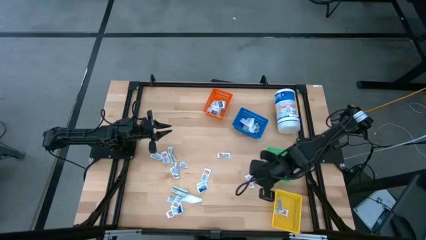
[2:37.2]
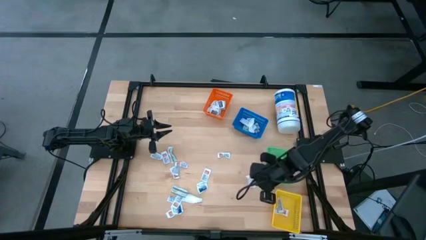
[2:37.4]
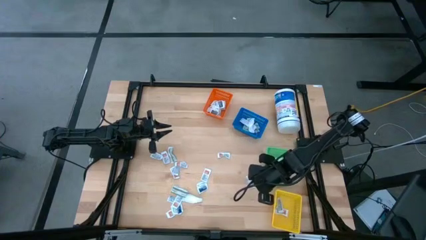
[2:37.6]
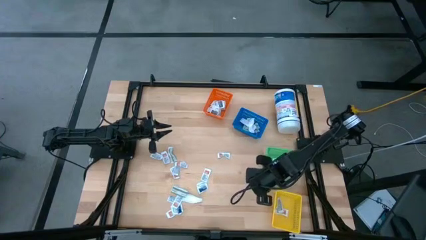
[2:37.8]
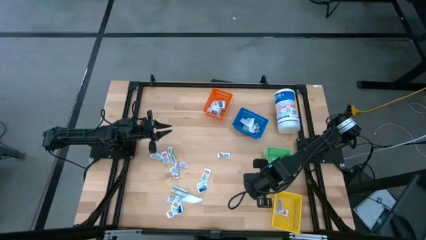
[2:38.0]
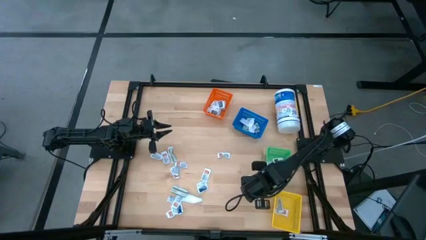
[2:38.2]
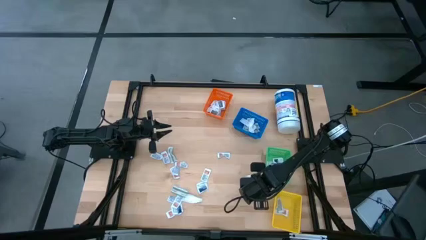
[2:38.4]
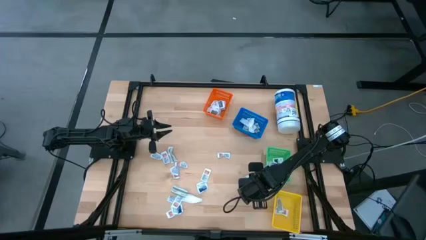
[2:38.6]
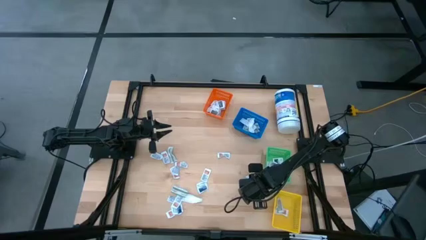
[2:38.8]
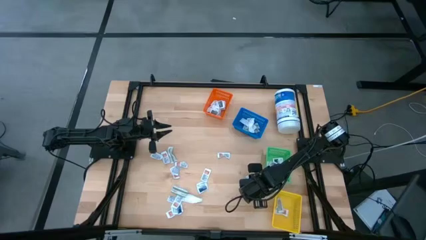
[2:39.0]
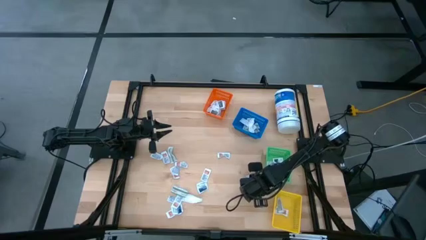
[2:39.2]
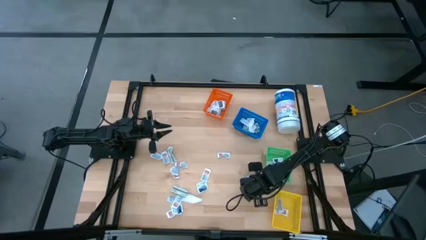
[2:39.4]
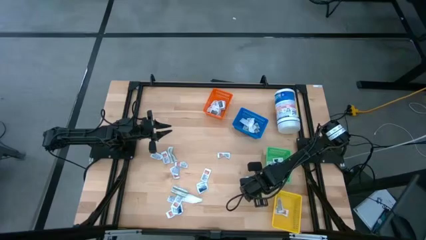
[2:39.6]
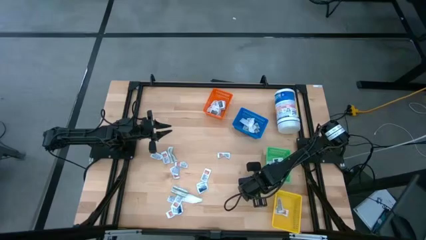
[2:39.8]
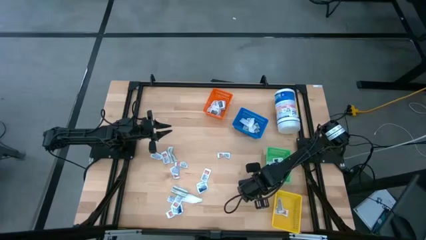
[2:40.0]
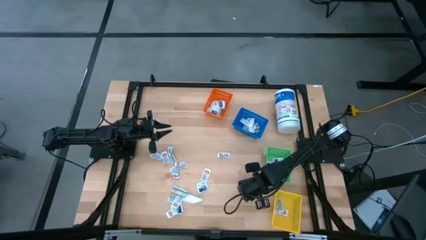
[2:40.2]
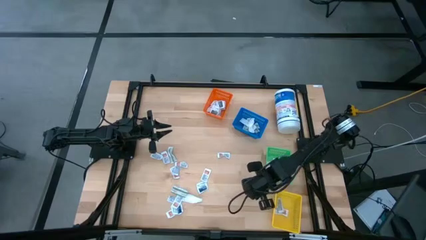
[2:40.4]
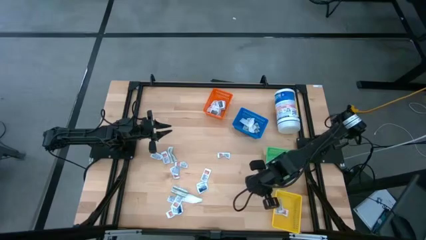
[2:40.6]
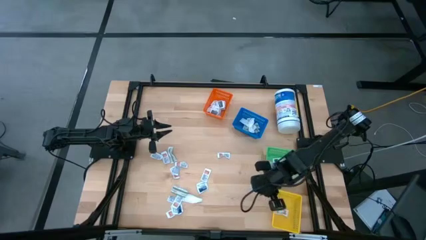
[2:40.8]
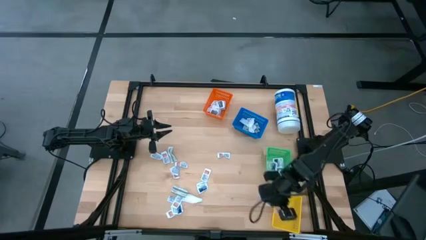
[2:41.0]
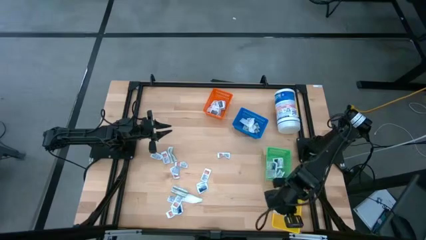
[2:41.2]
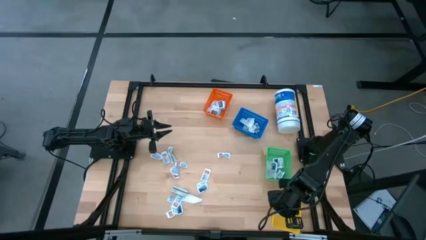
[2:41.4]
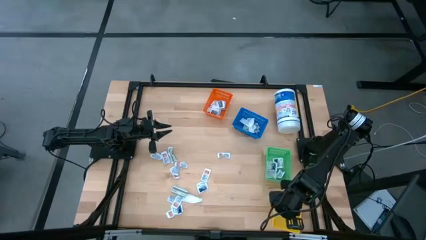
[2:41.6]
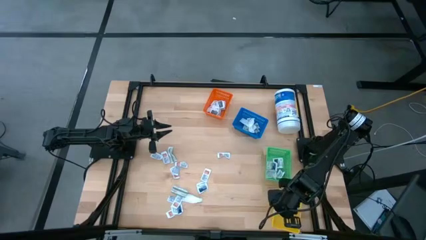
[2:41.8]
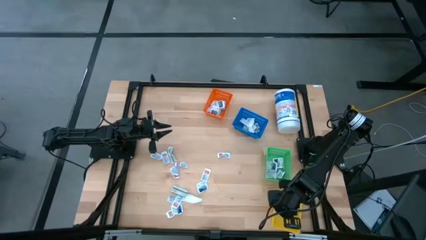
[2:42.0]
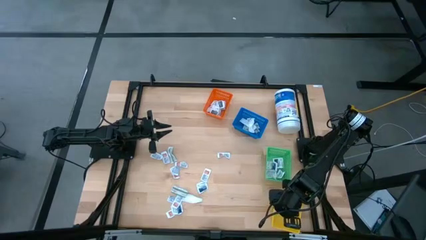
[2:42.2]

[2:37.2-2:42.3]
Task: Pick & Place First Aid Supplies
Put the orange ointment pack into the yellow basket

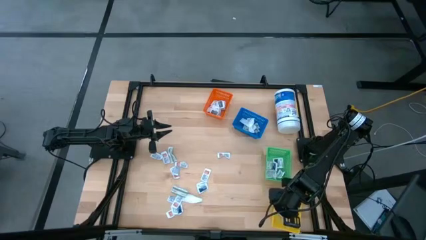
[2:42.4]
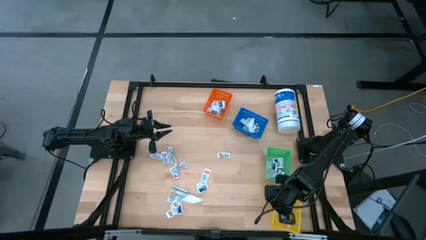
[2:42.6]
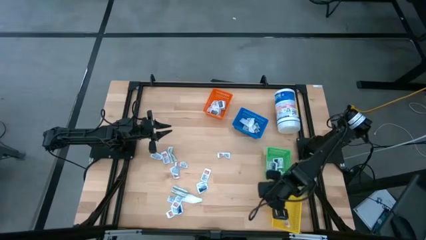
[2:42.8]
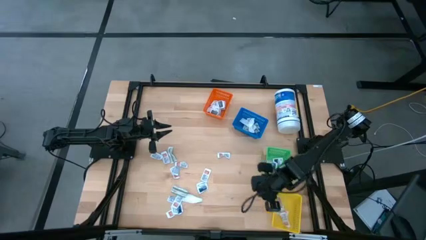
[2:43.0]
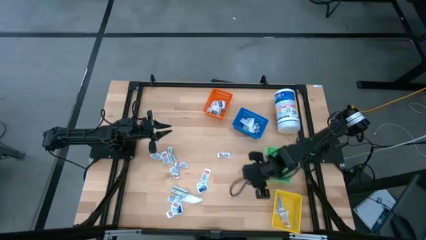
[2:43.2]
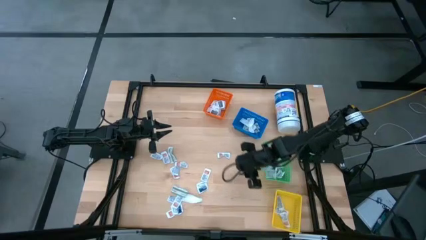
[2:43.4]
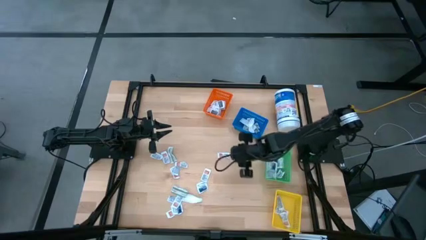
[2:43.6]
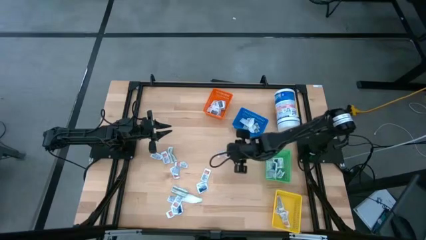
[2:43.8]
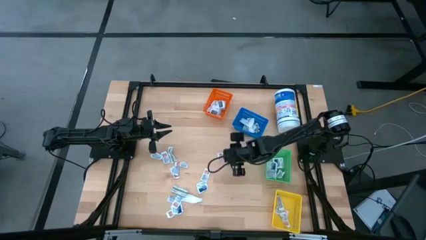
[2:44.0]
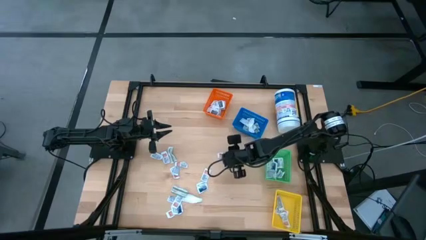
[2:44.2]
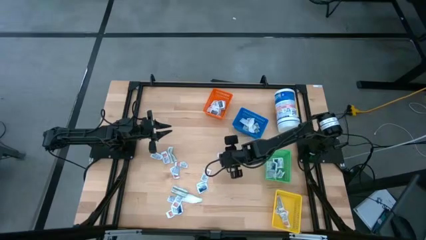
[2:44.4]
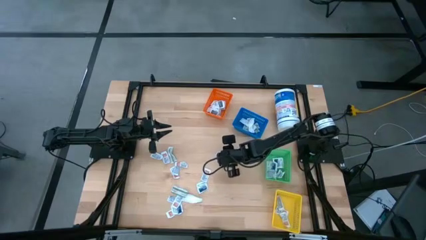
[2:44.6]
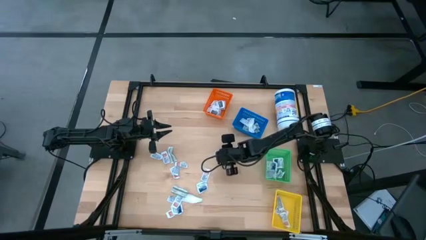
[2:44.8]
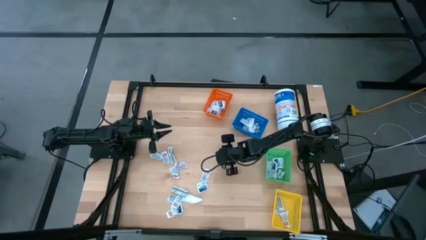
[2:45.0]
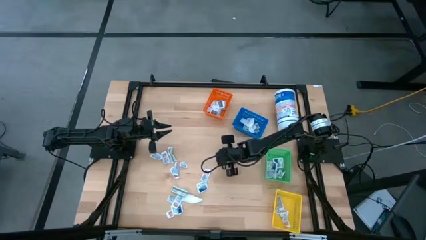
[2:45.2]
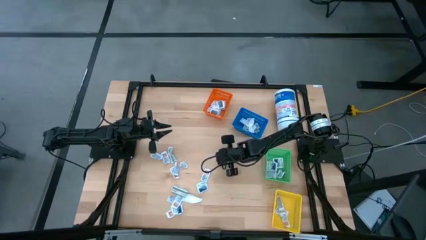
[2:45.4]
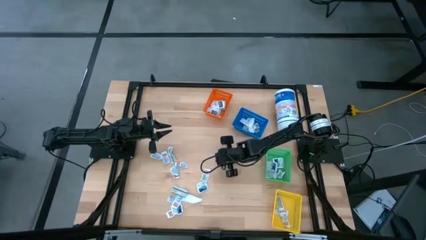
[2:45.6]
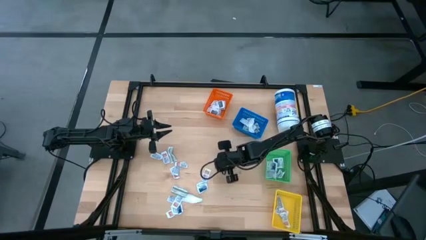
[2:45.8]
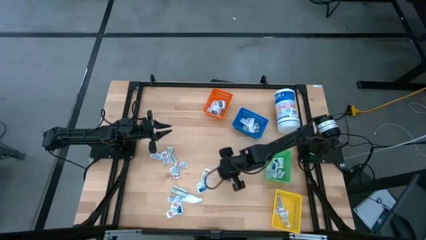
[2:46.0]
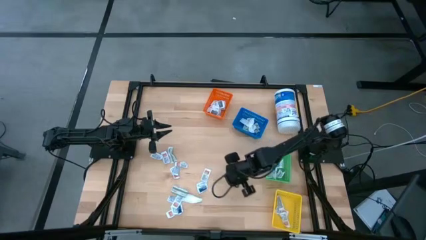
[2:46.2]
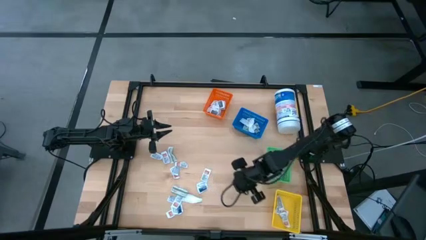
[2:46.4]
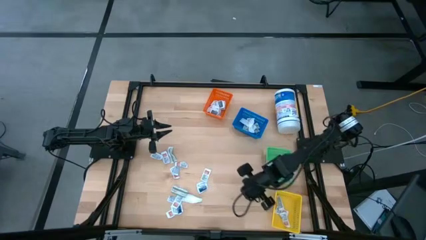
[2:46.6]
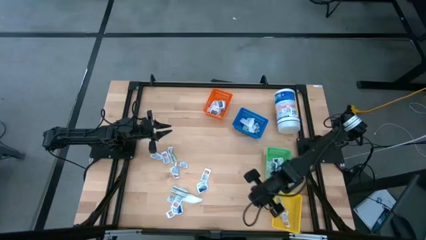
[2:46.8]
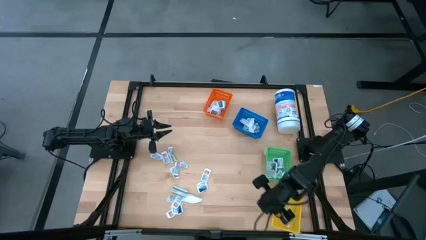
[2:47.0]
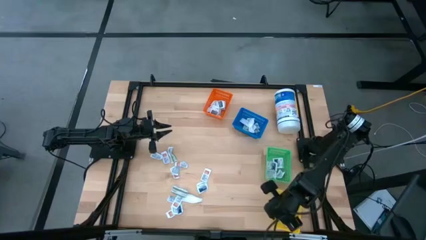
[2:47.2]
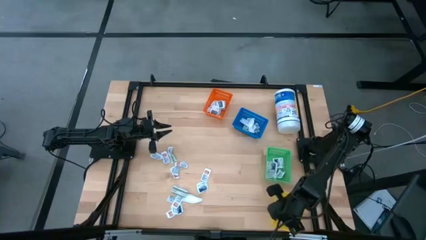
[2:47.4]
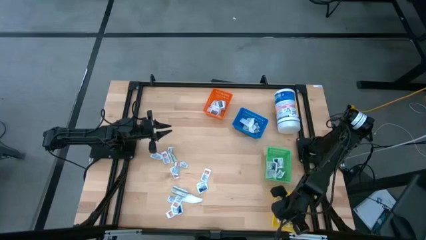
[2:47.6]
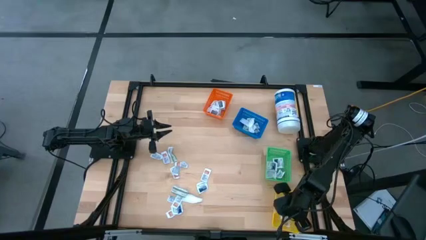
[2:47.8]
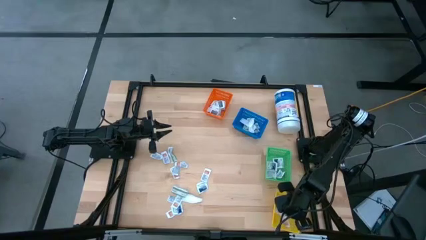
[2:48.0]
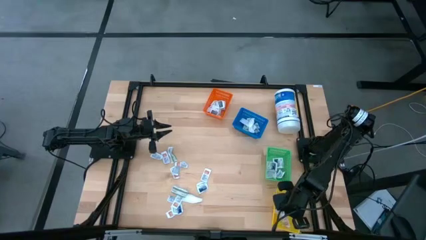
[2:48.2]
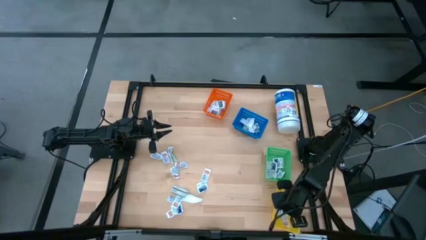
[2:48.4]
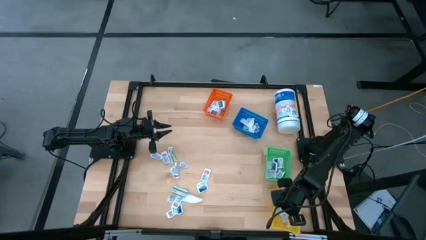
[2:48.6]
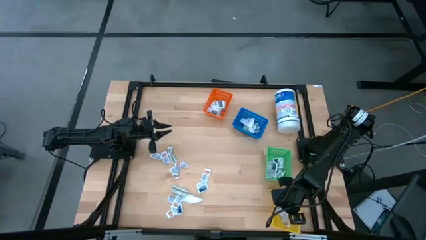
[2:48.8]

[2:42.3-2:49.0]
Put the orange ointment pack into the yellow basket

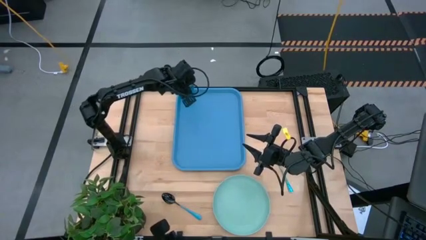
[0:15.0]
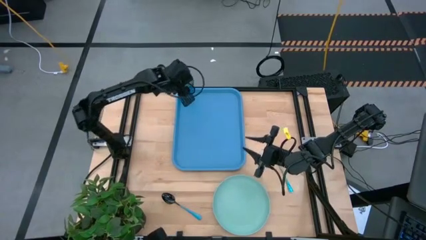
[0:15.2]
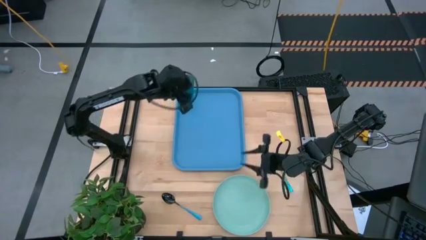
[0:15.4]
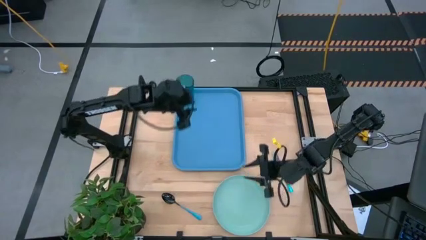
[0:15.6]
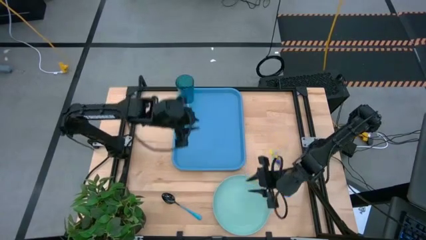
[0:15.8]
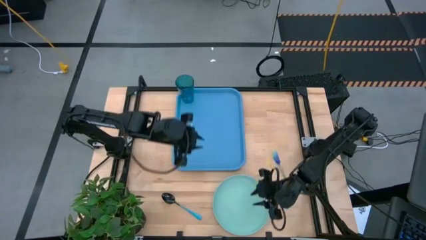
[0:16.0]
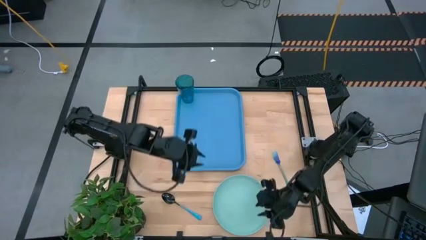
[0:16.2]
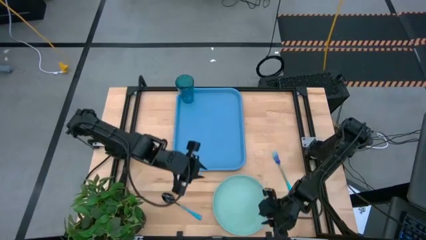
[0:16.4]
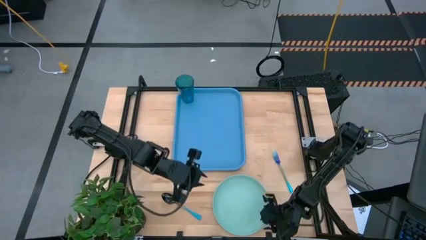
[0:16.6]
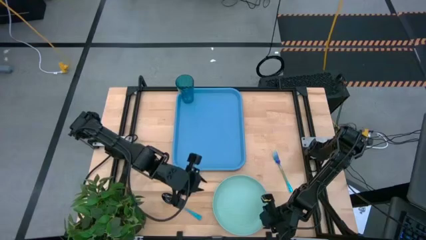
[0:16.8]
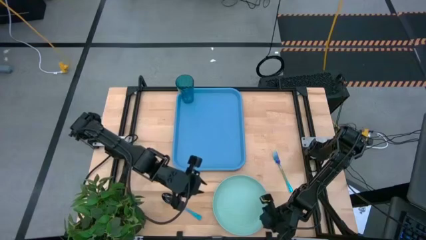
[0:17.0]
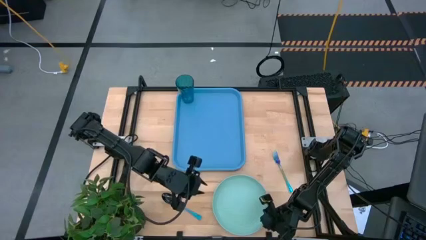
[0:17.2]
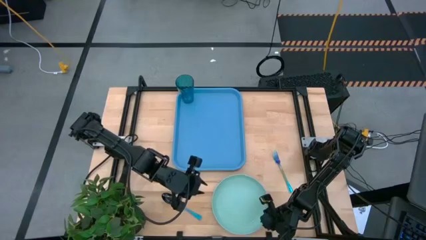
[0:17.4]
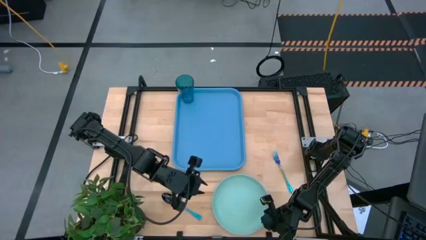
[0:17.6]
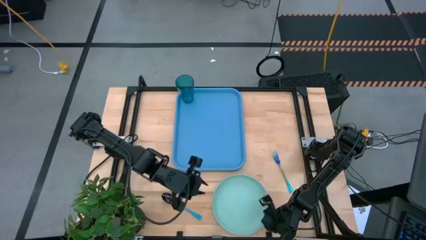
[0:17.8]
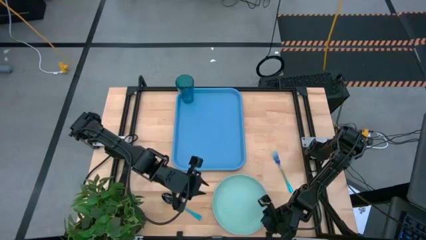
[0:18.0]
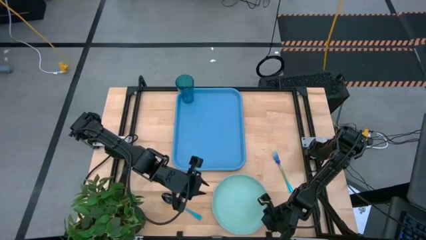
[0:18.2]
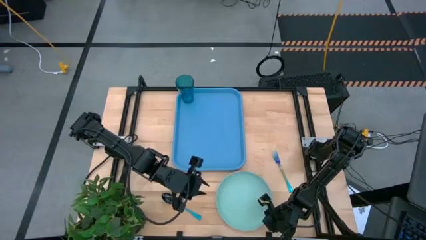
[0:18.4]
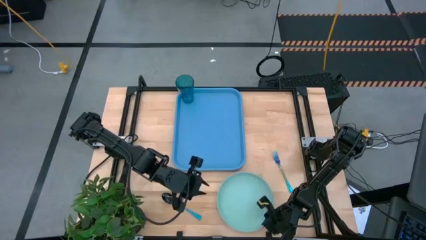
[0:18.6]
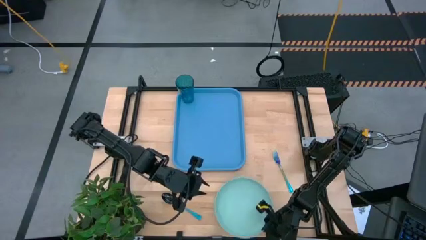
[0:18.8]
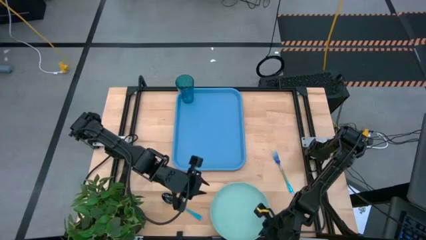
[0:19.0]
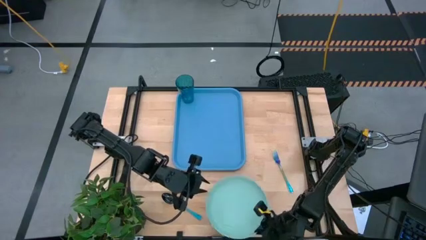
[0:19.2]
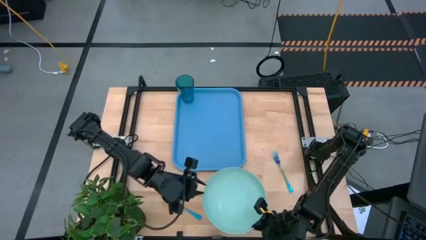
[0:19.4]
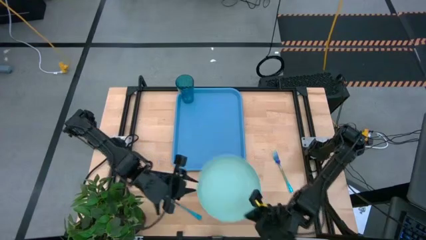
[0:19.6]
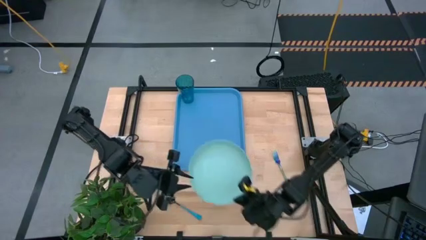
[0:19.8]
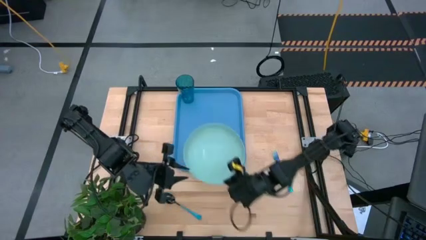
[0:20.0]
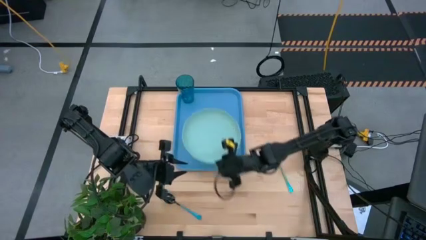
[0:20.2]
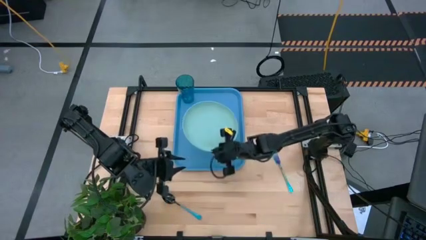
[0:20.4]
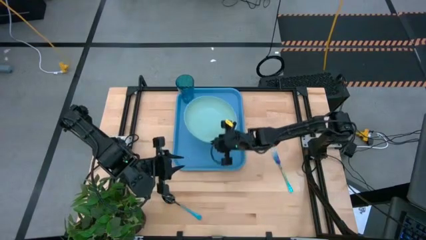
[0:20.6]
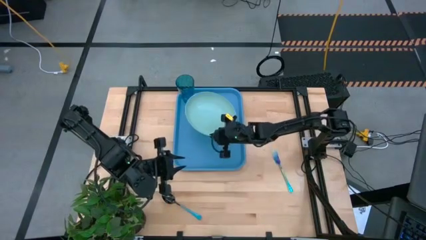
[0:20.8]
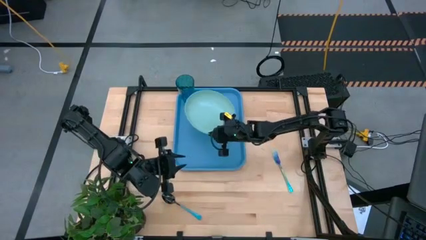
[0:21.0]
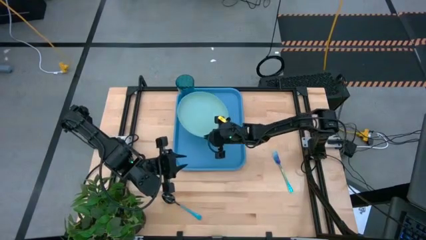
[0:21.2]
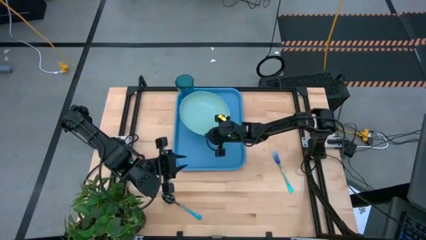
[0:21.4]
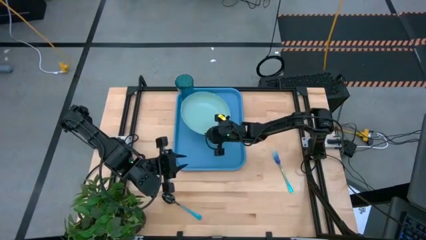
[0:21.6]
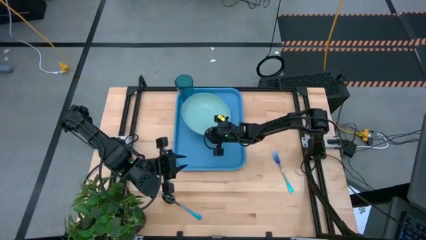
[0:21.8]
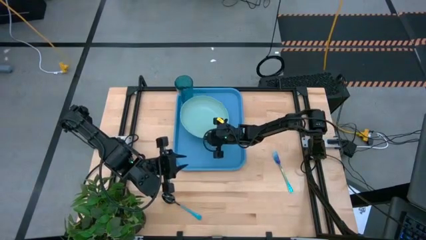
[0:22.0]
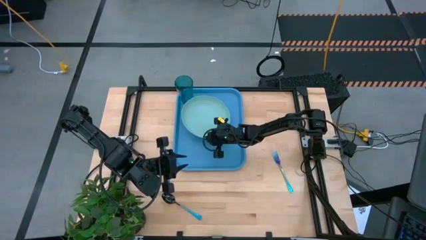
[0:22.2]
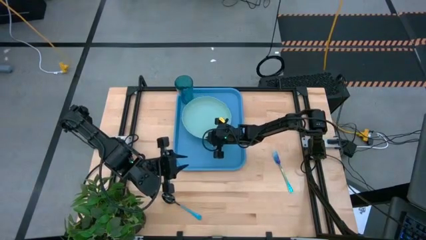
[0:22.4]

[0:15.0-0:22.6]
Task: Pick and place plate/cup/fork/spoon on tray
Put the light green plate on the blue serving tray to the bottom left of the blue cup
